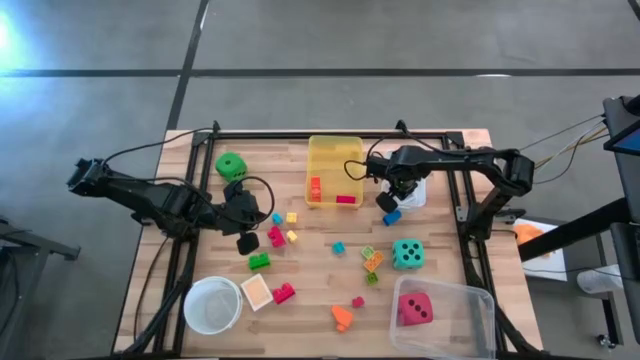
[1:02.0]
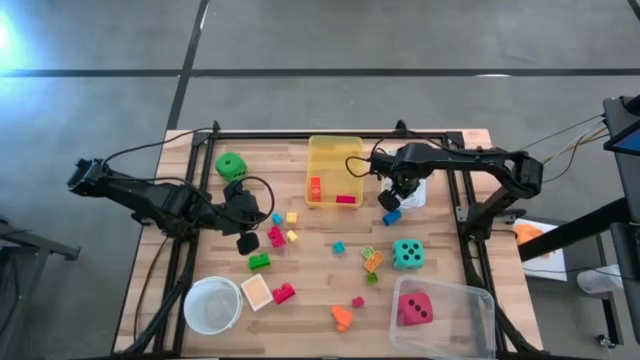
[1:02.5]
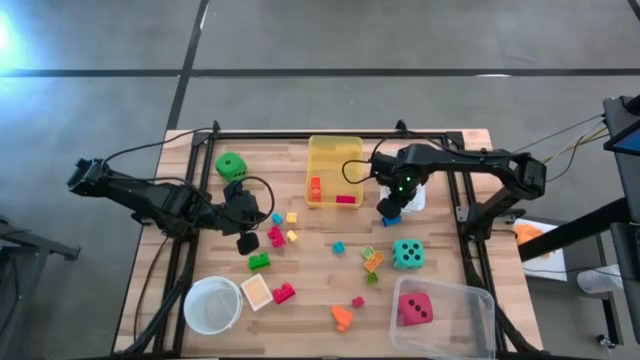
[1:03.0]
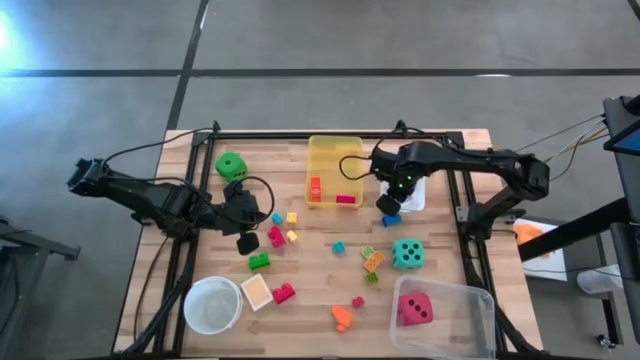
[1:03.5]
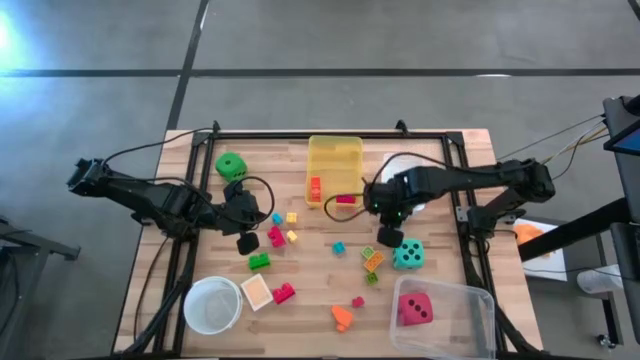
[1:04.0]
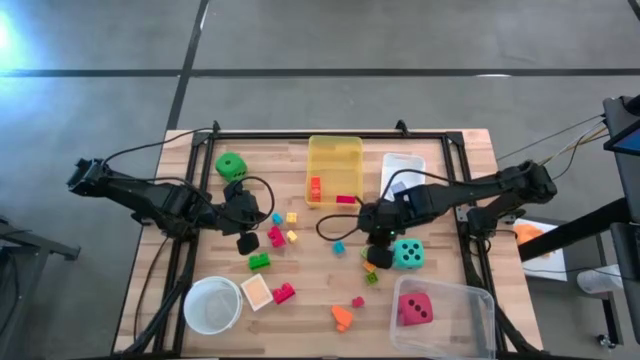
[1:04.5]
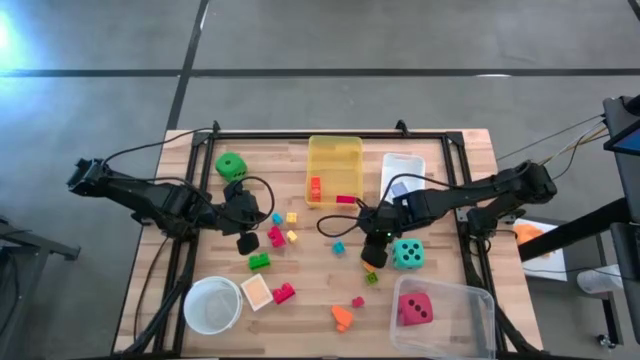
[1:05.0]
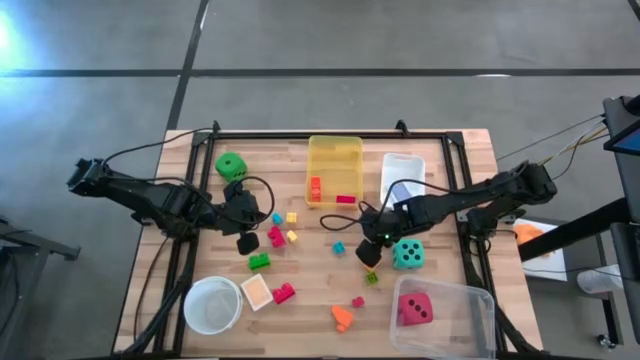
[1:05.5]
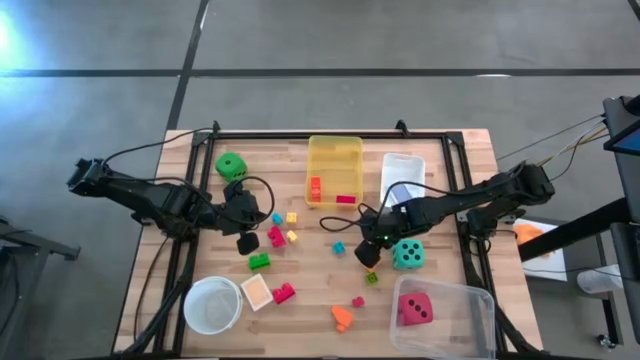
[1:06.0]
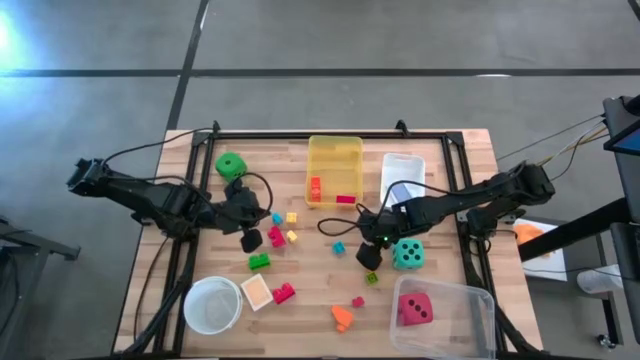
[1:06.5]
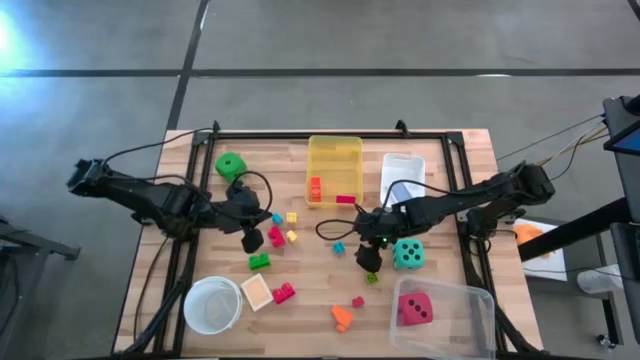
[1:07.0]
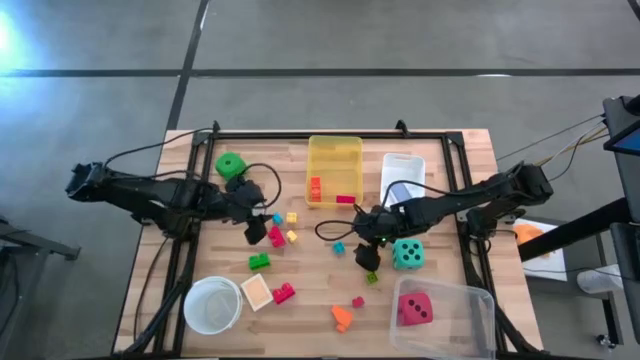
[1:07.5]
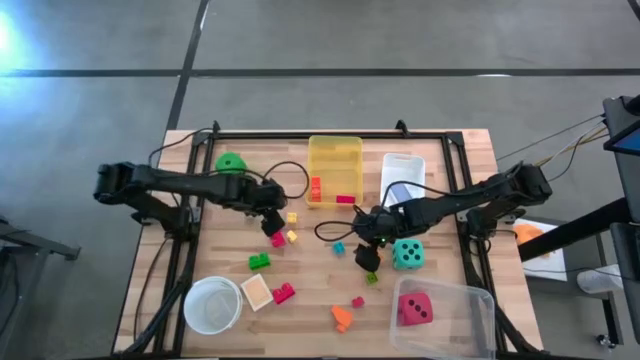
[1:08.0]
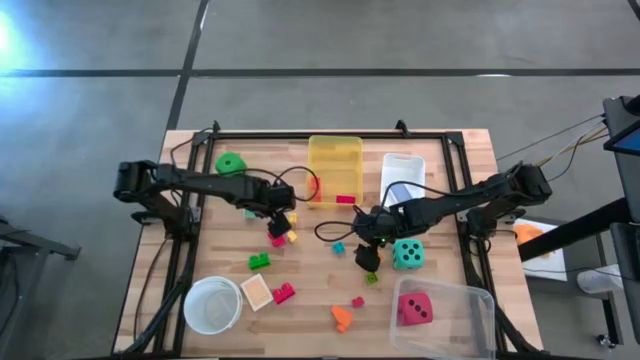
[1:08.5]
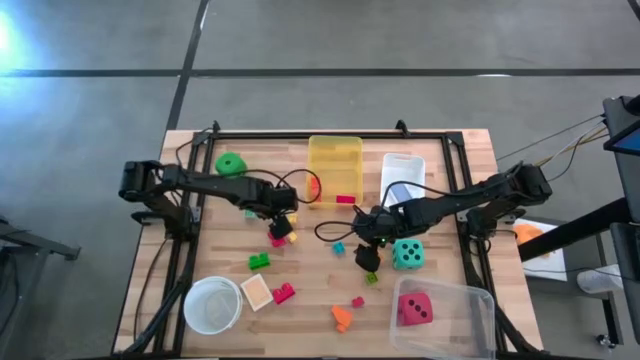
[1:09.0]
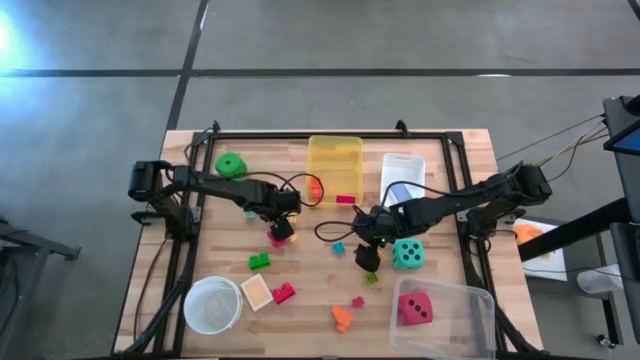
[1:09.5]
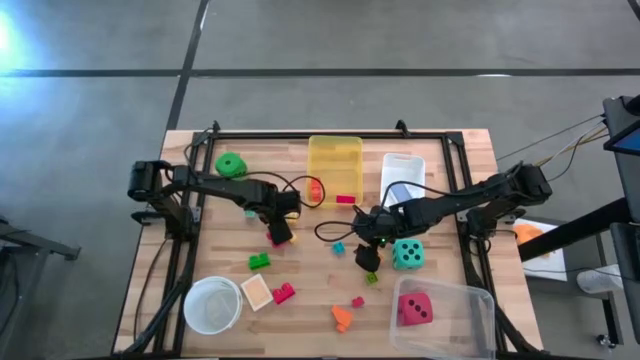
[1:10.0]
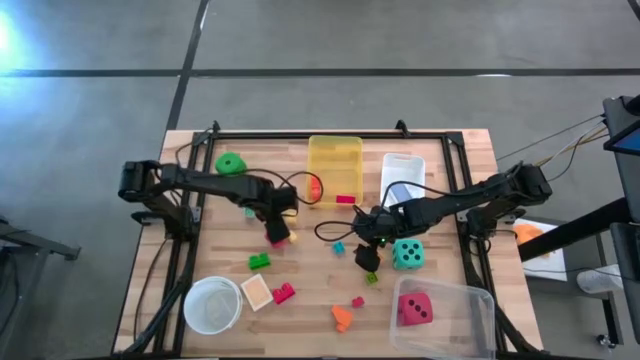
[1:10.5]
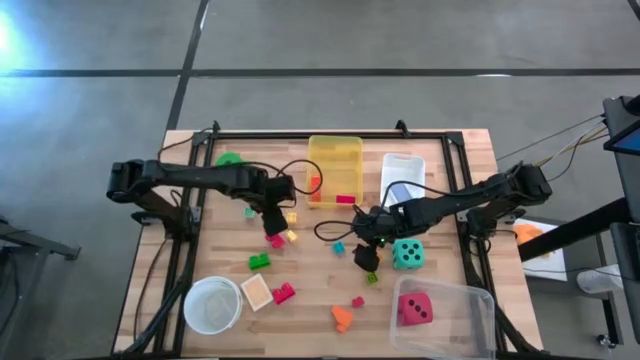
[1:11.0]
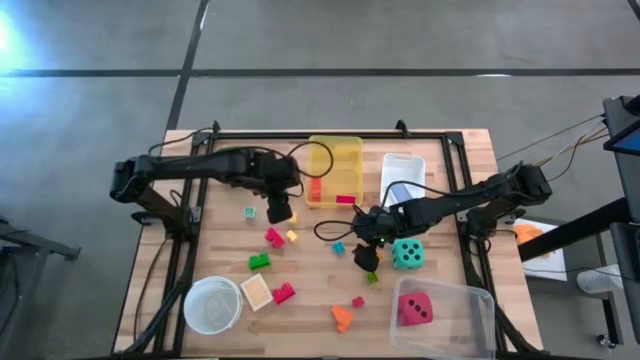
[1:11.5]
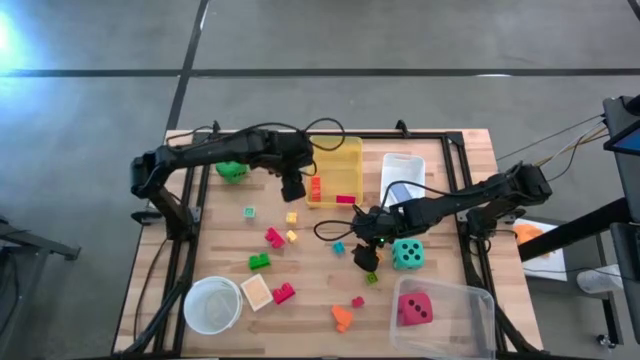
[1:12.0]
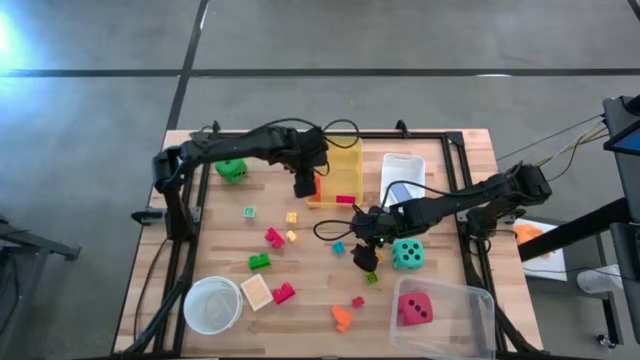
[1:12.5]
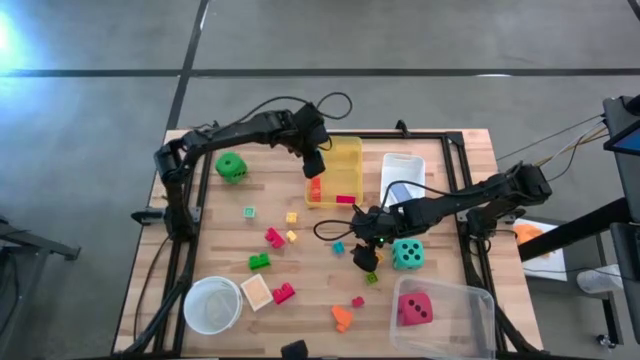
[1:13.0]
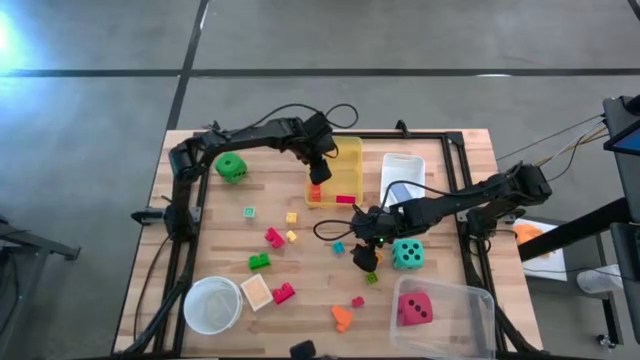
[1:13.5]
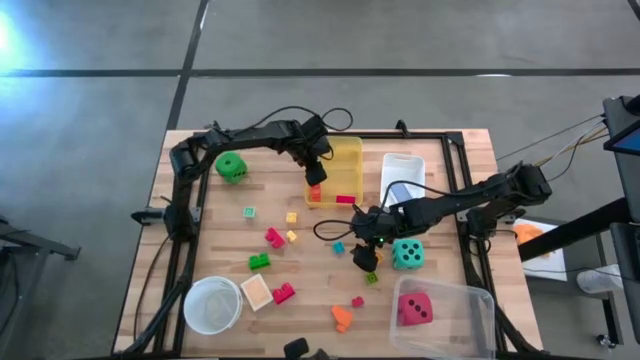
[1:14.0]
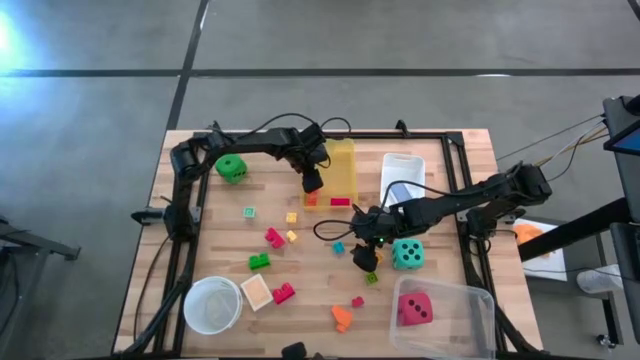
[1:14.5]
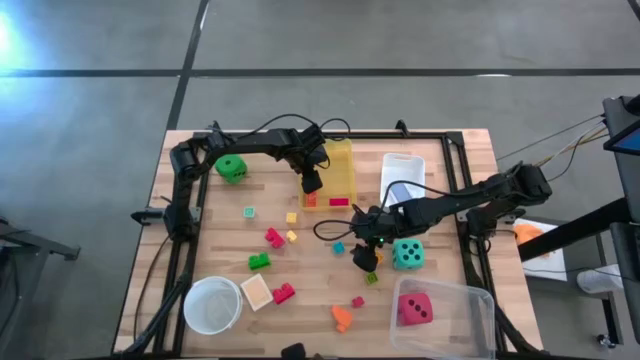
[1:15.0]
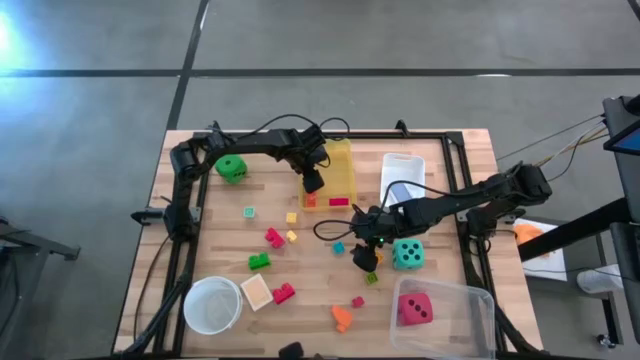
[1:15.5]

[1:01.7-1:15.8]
Task: Pick & Place Toys
Put the blue game piece into the yellow bin

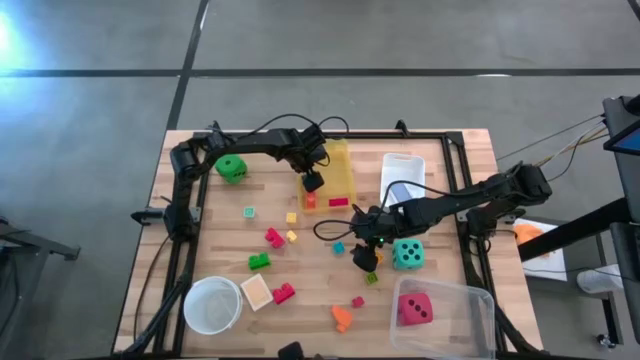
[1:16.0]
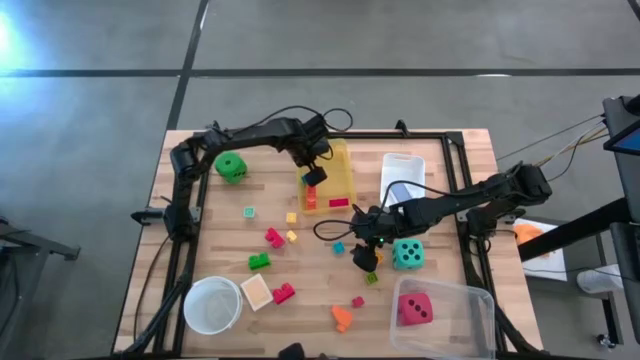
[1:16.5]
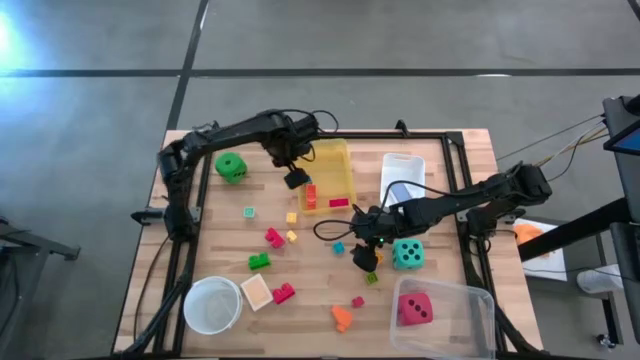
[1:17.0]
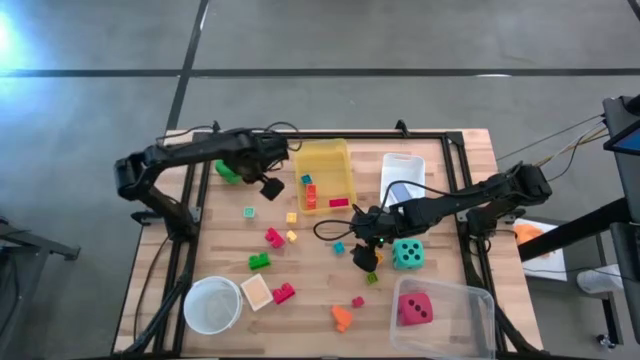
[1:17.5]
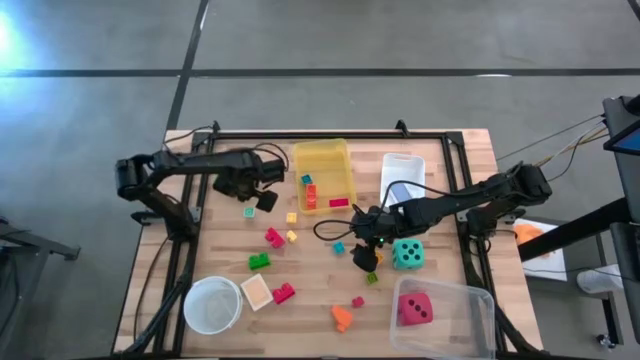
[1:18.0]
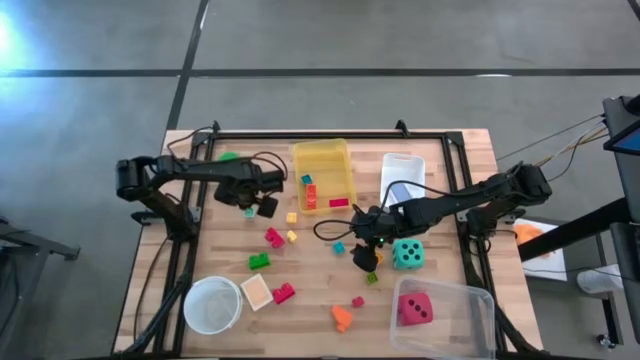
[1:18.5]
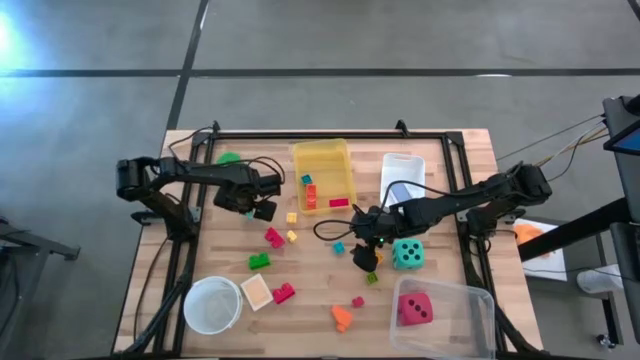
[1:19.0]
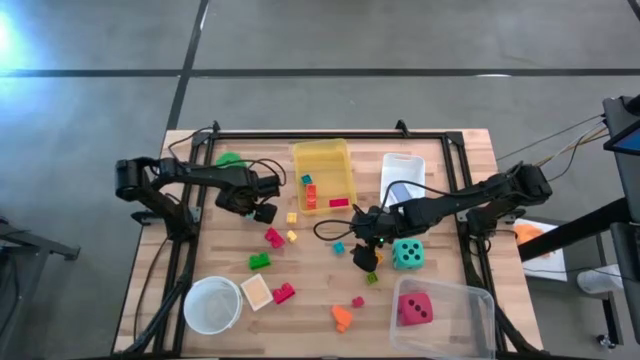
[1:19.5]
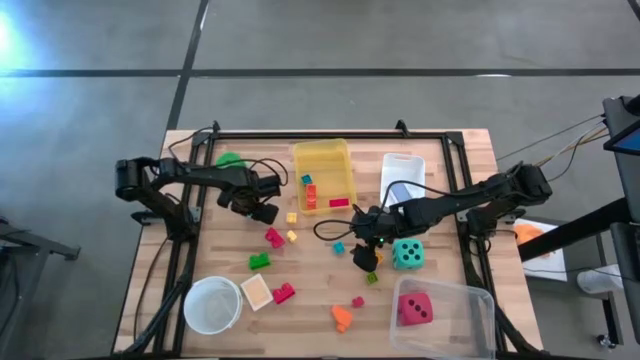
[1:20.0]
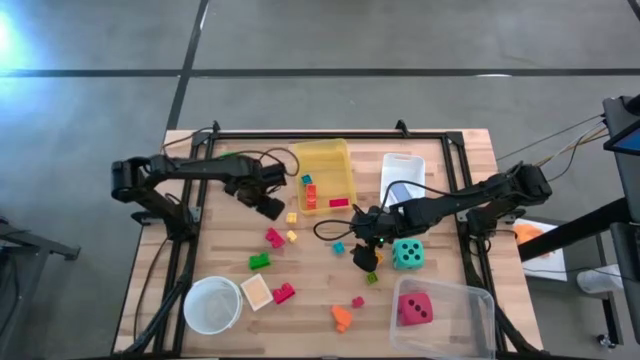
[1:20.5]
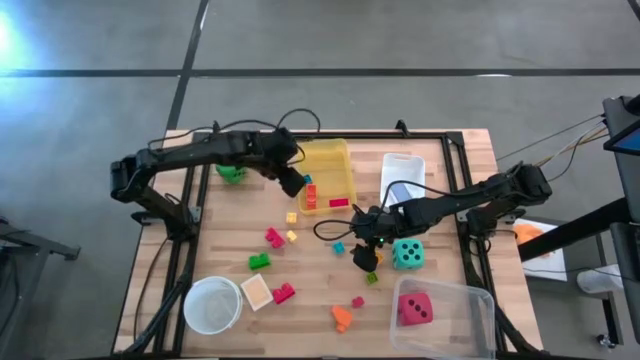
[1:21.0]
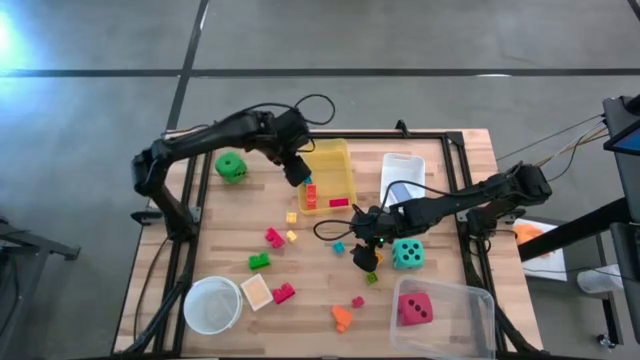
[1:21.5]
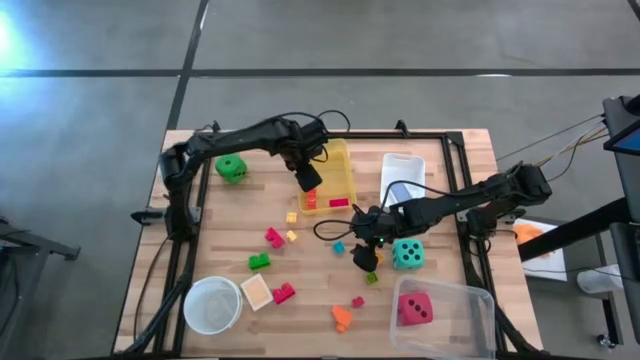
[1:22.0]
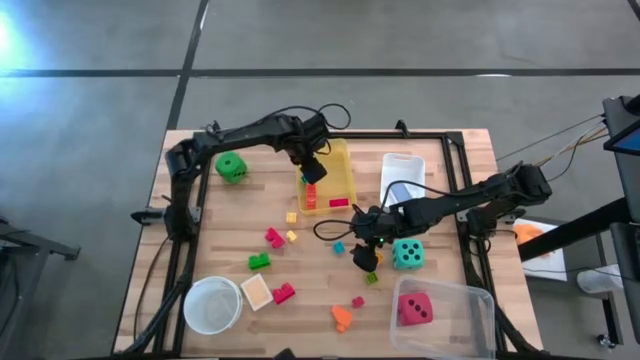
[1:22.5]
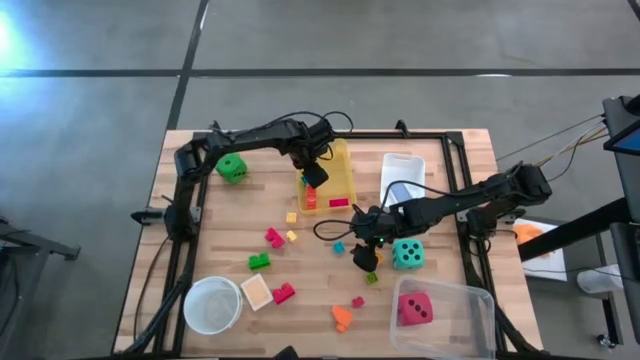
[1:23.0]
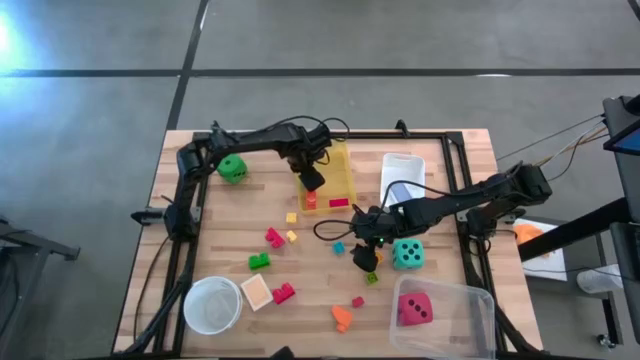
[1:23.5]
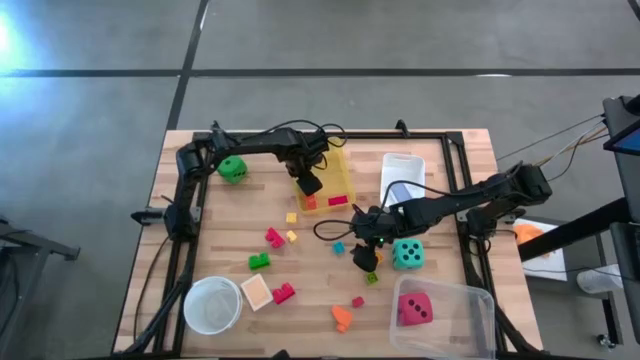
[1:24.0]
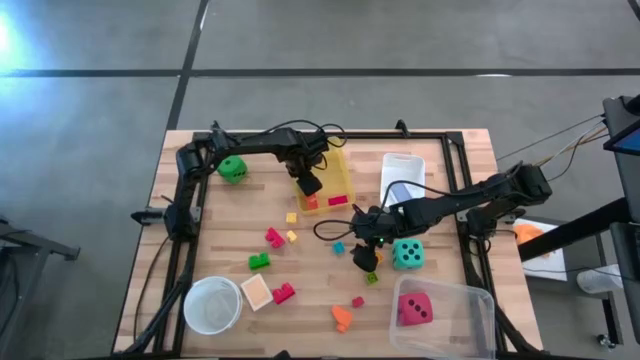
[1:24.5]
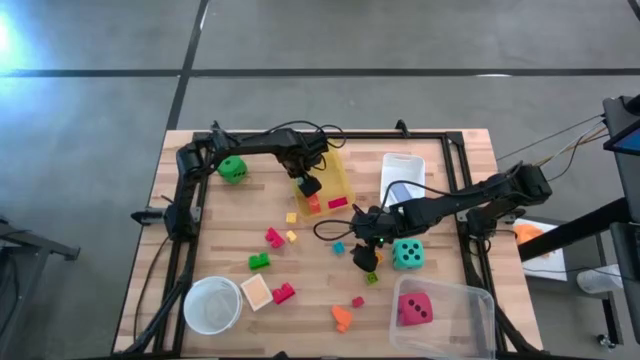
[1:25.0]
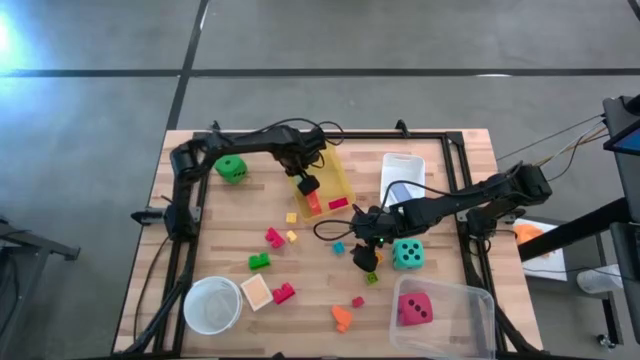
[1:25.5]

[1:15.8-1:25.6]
Put the light blue game piece into the yellow bin
